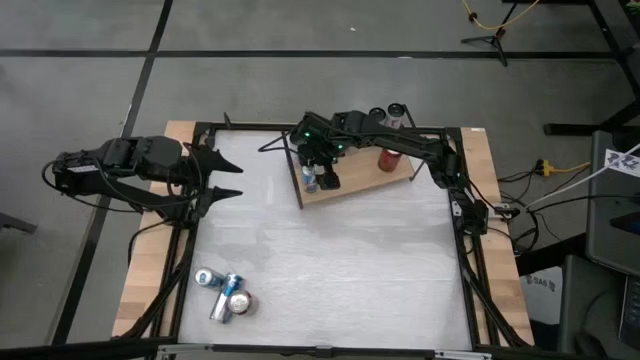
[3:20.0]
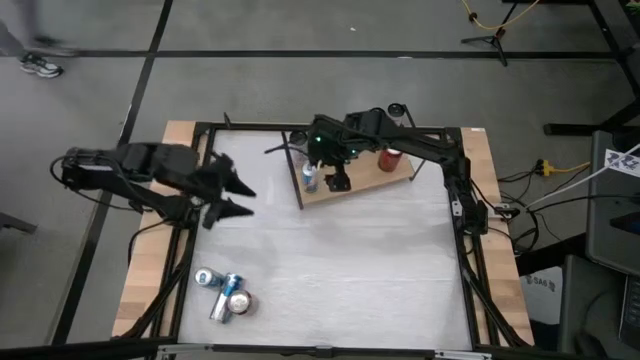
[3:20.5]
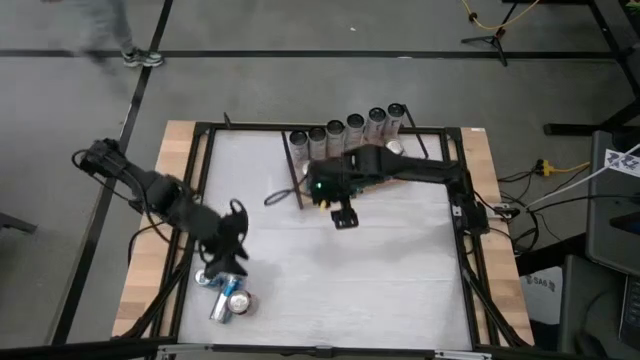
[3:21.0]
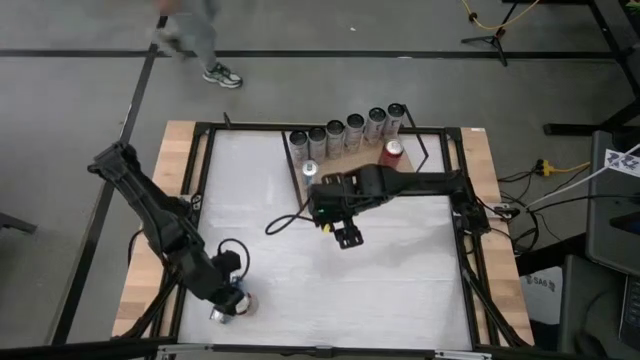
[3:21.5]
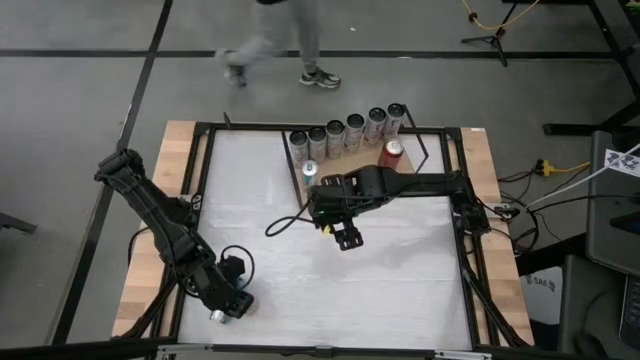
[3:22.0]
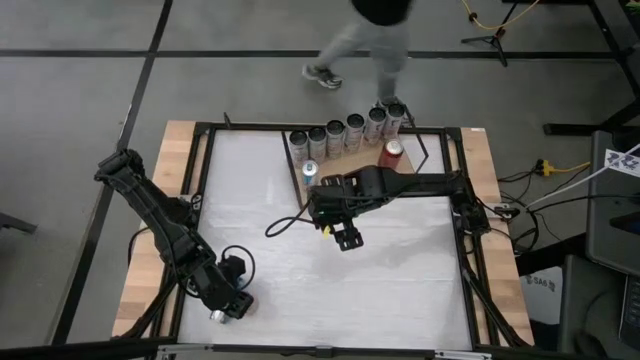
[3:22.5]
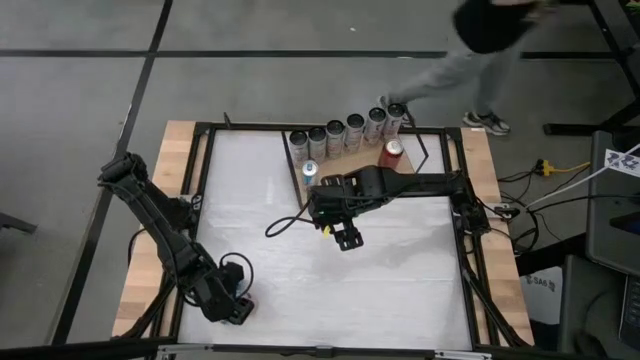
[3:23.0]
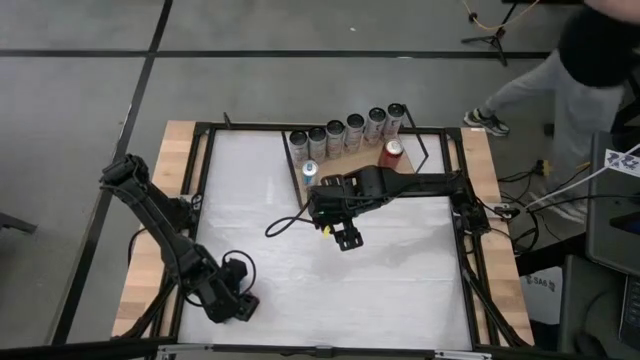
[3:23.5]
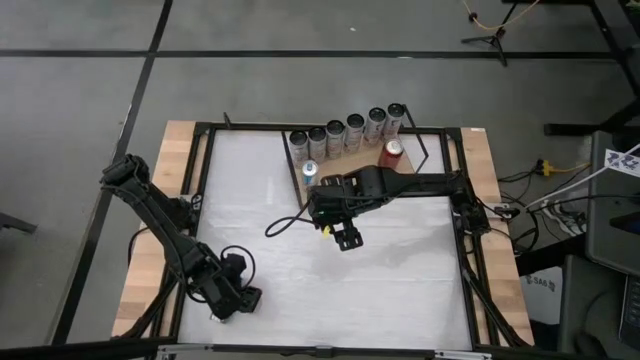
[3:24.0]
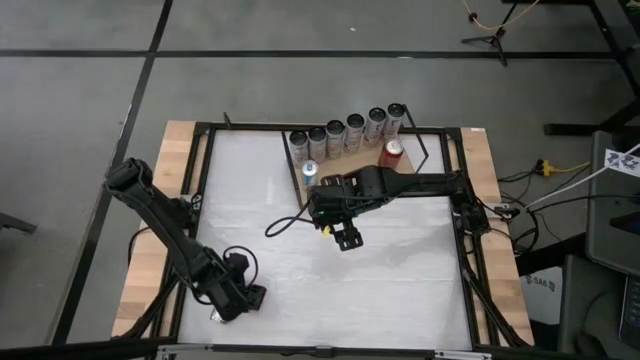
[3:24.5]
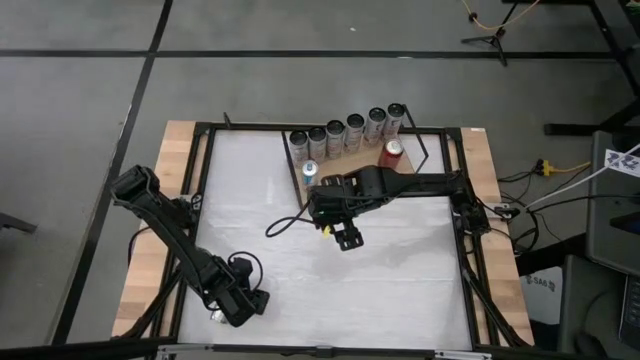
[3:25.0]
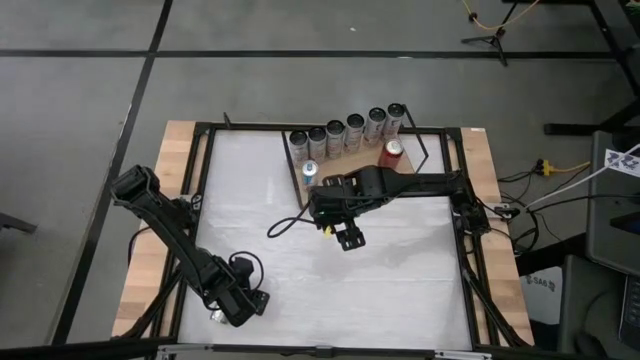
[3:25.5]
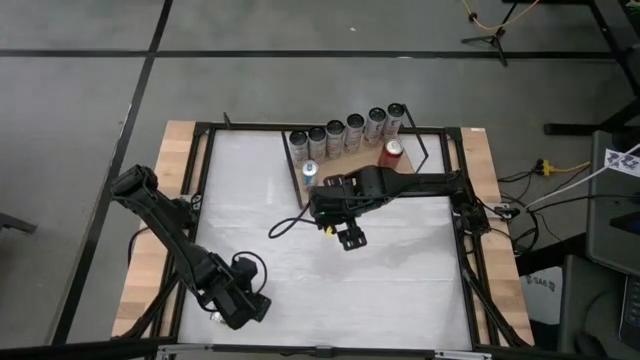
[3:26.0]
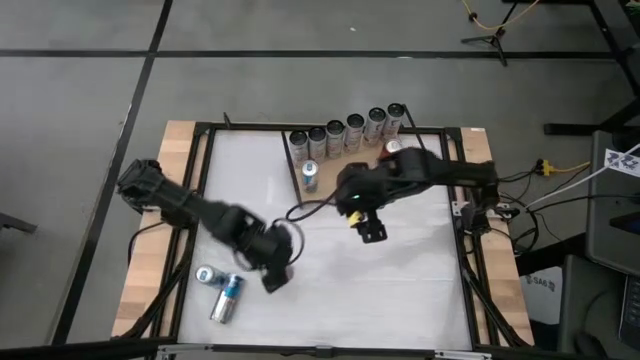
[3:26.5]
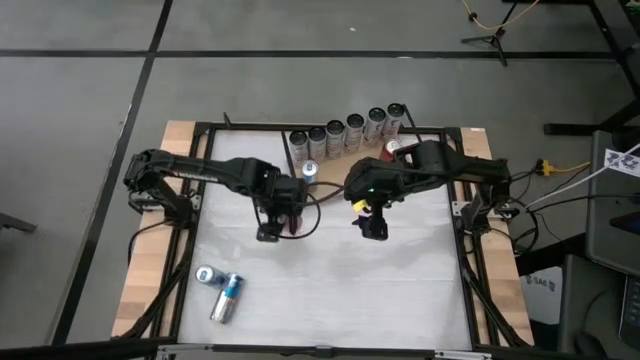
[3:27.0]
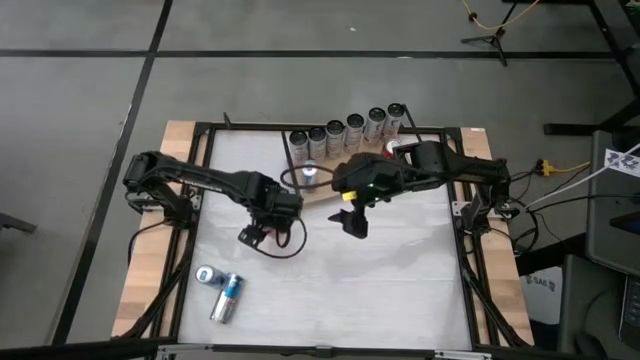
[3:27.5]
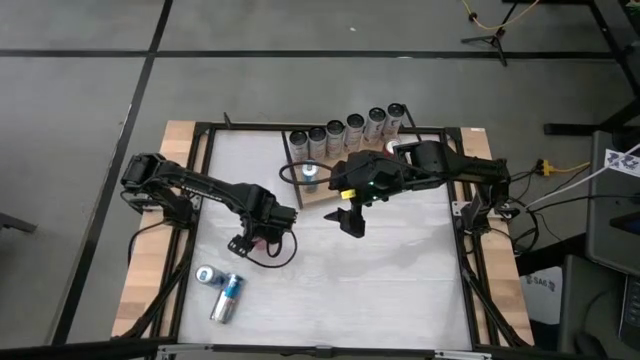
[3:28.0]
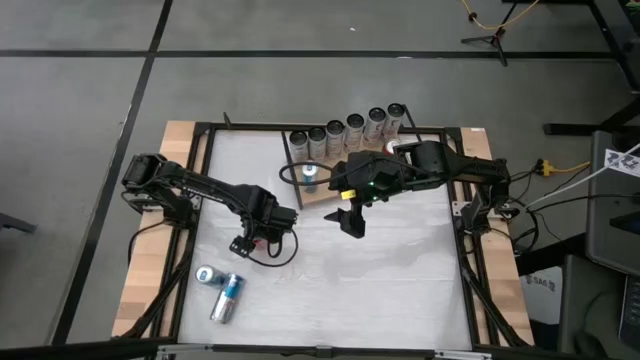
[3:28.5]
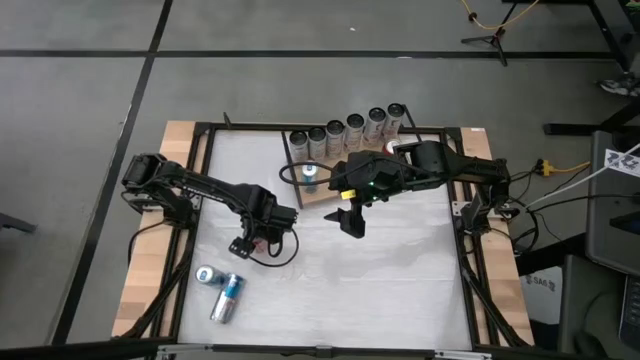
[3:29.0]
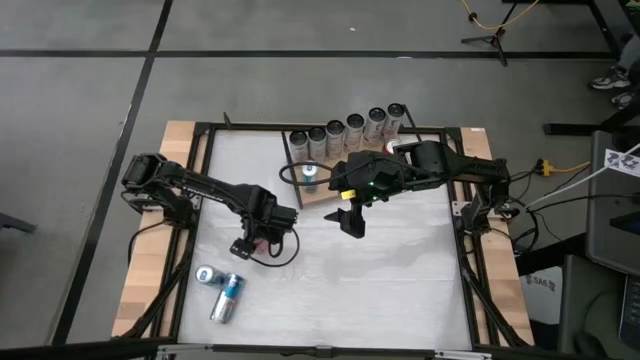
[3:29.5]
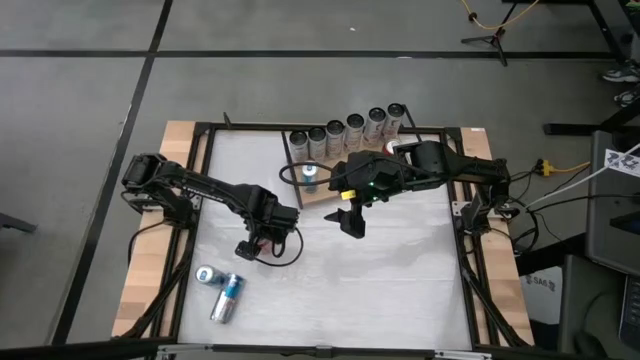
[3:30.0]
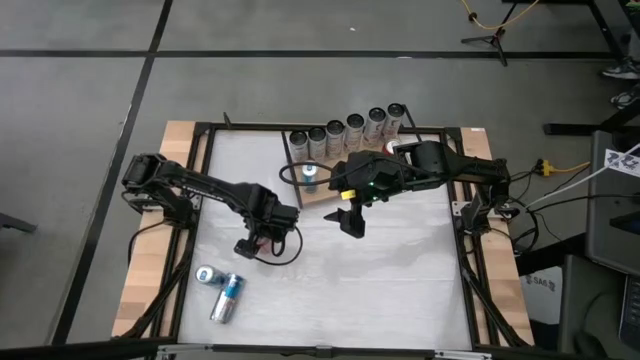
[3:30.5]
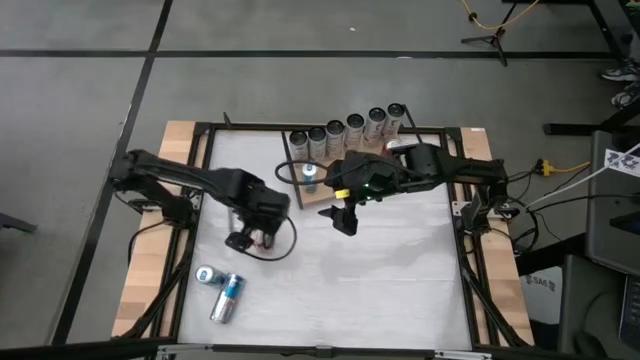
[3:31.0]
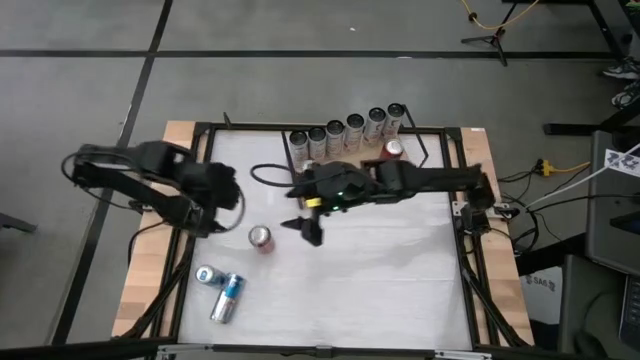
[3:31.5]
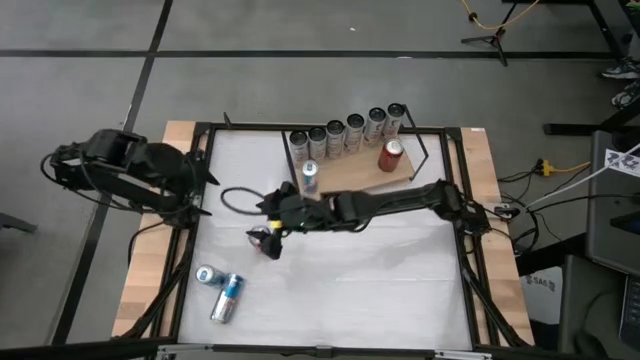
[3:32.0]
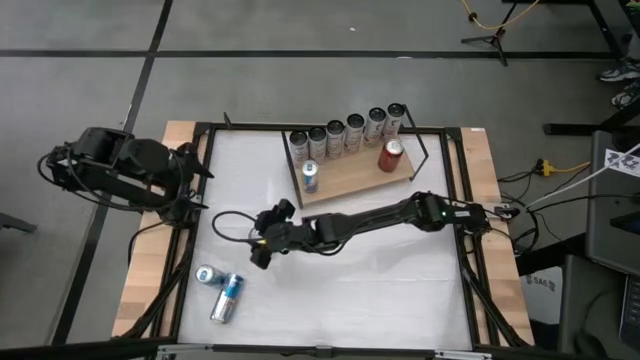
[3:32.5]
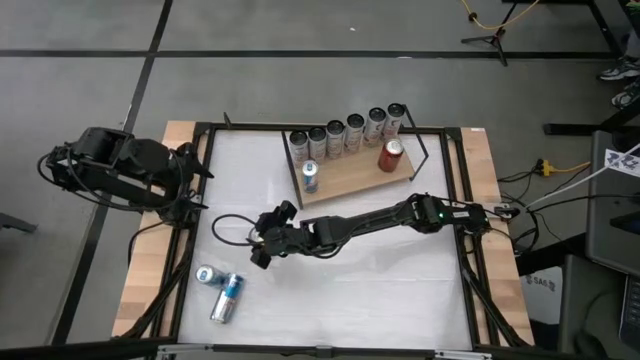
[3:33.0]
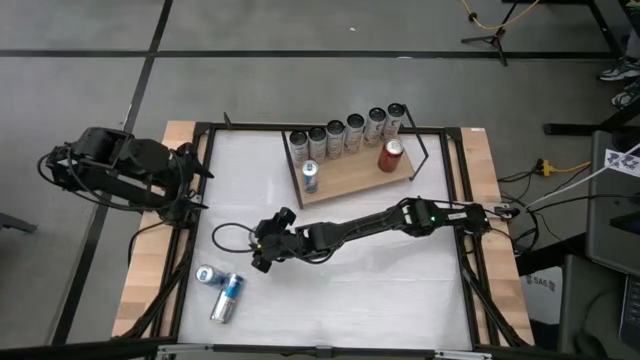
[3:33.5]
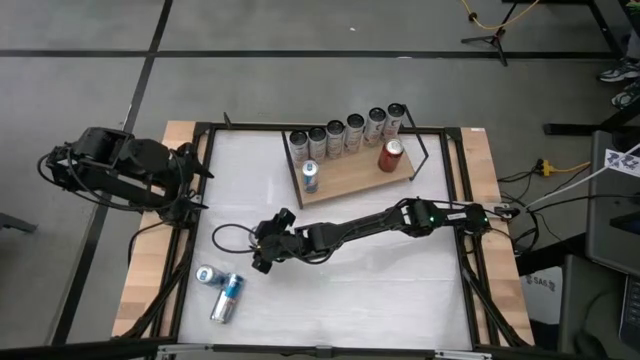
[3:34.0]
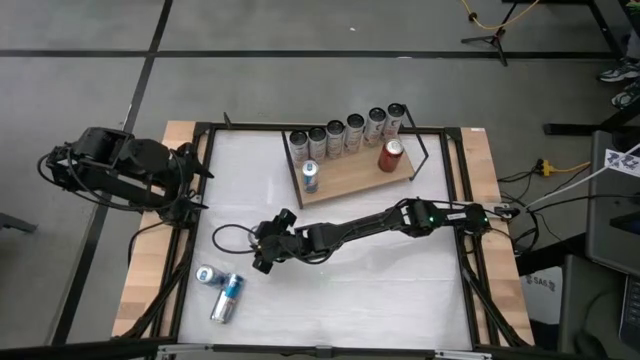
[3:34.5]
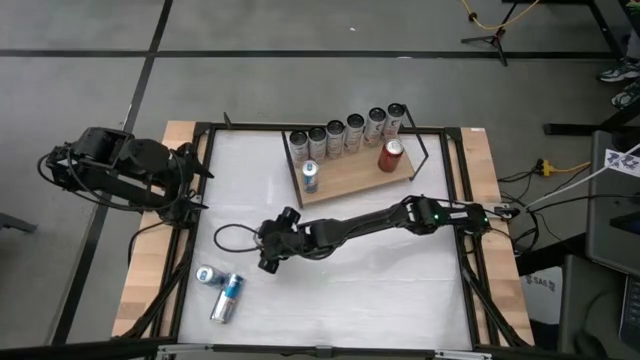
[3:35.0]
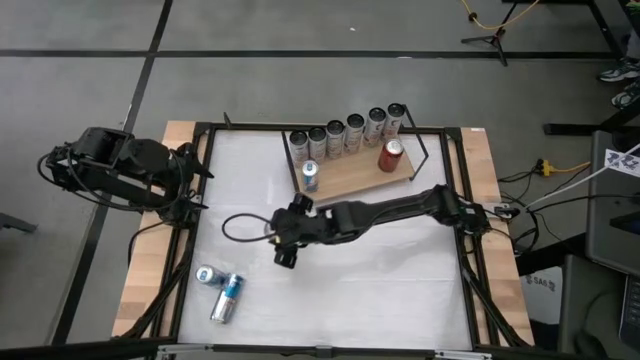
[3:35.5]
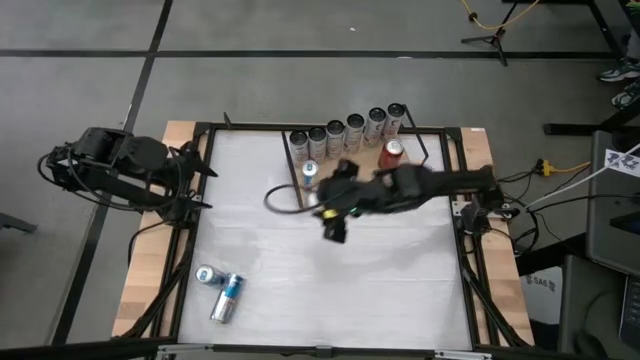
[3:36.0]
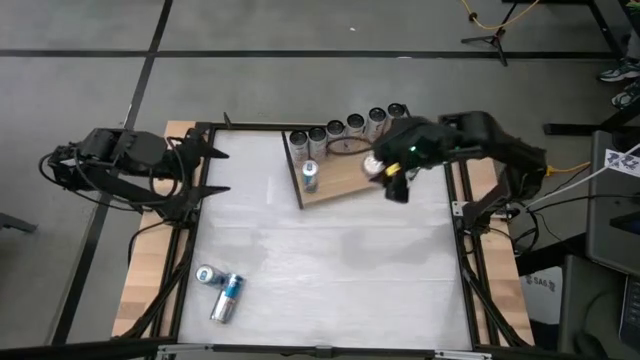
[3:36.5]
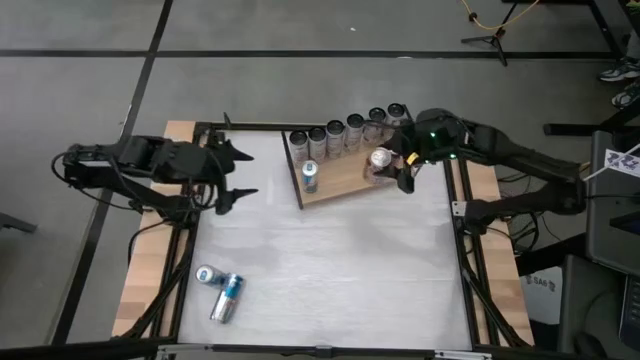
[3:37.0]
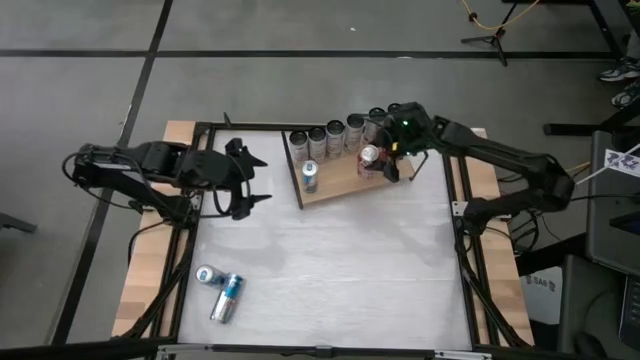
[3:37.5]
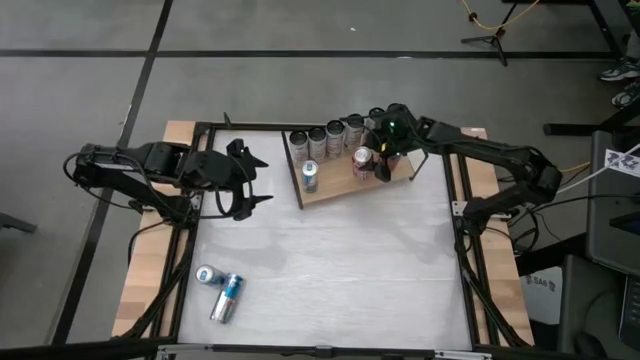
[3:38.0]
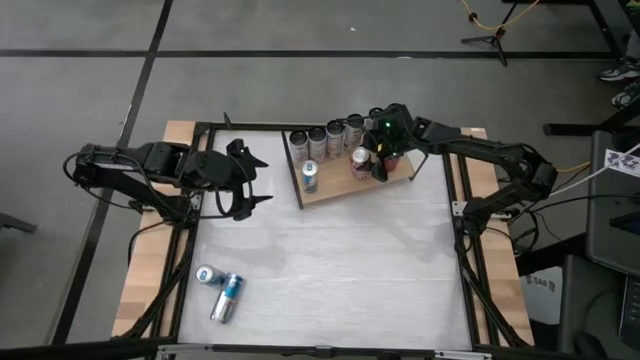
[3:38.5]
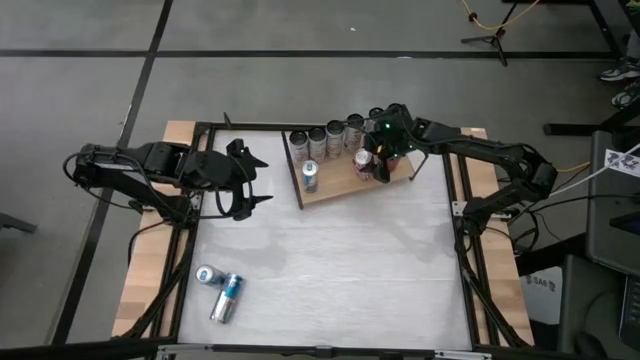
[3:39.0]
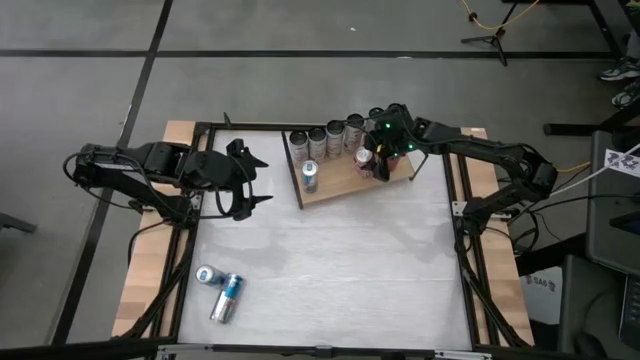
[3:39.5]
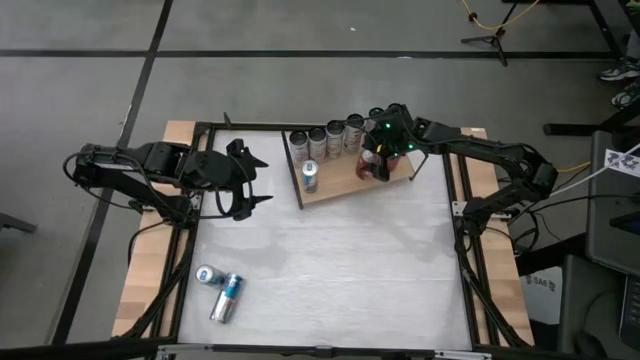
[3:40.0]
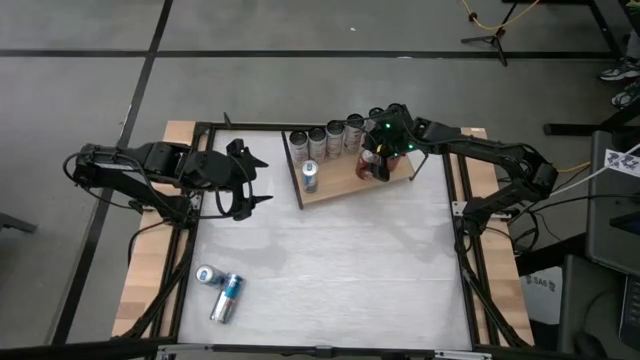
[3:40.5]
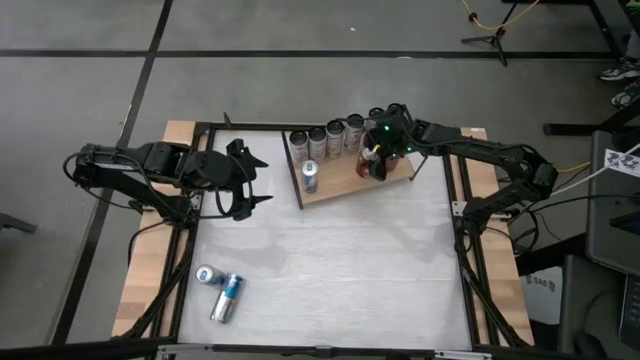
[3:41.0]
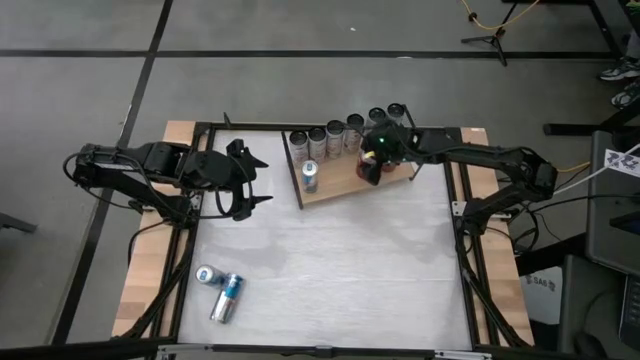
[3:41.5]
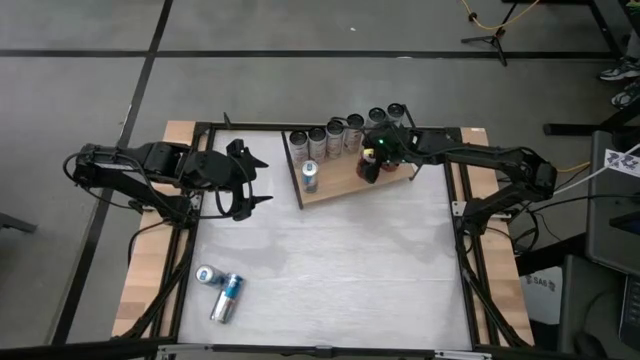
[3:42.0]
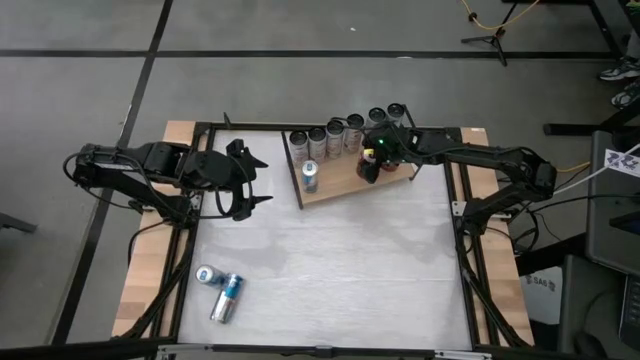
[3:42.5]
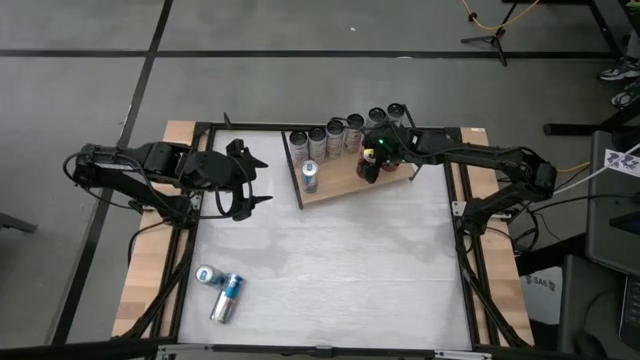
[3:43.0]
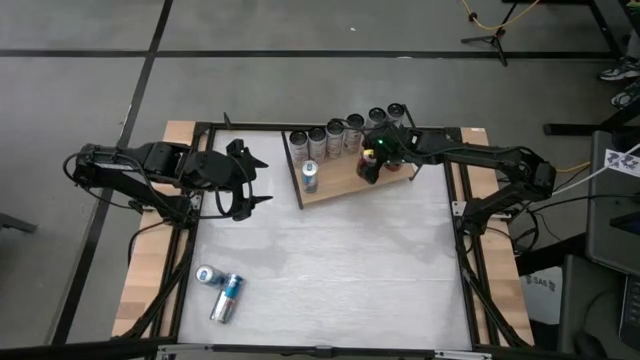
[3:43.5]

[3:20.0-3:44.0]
Task: Place canned beverage on shelf
Put the red black soda can on the shelf aligned with the other red black soda can
